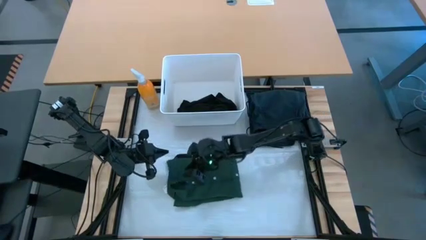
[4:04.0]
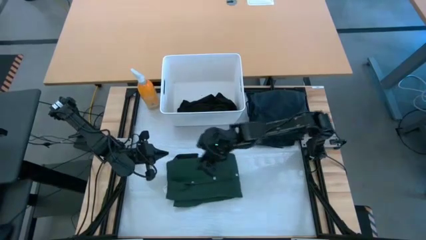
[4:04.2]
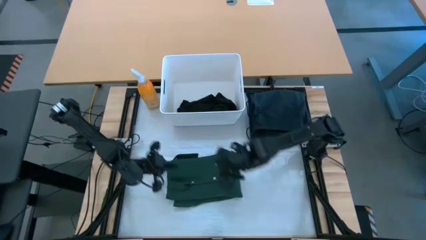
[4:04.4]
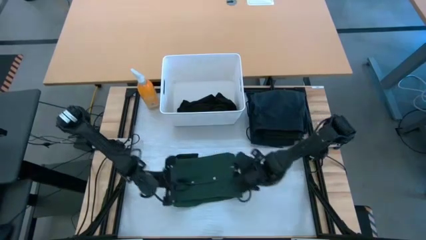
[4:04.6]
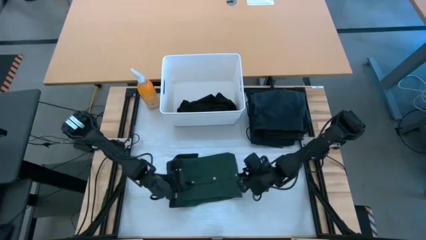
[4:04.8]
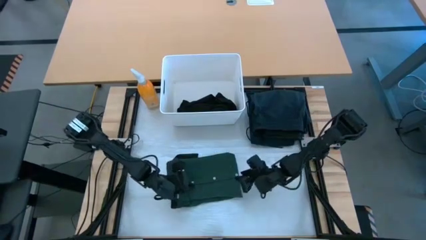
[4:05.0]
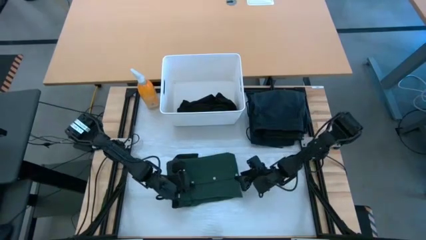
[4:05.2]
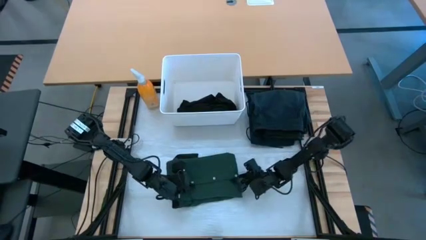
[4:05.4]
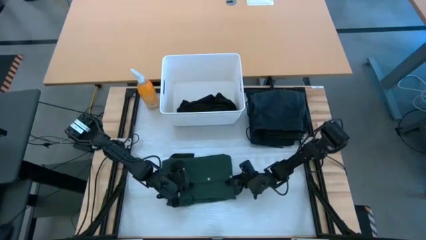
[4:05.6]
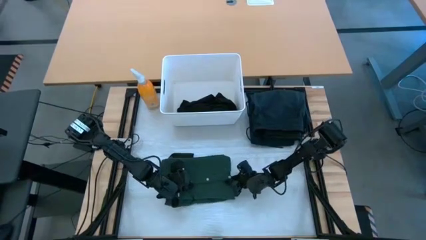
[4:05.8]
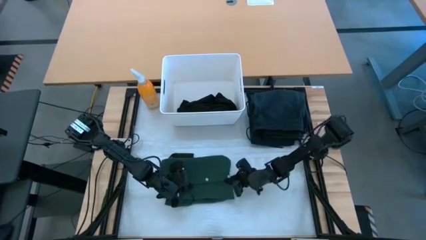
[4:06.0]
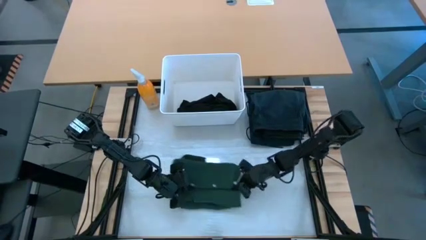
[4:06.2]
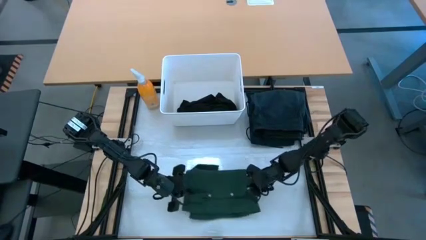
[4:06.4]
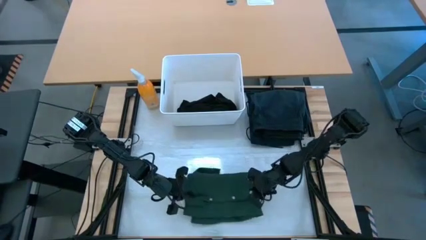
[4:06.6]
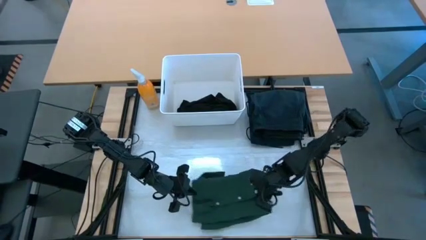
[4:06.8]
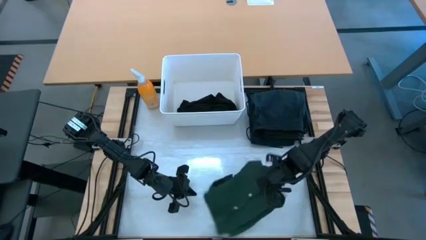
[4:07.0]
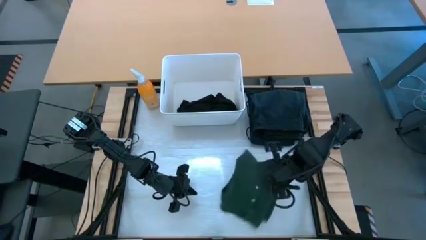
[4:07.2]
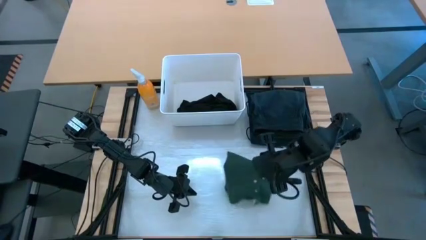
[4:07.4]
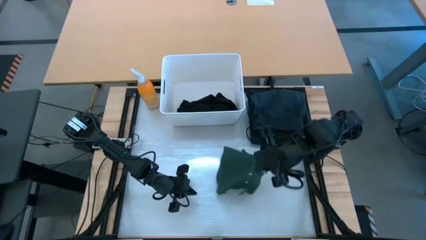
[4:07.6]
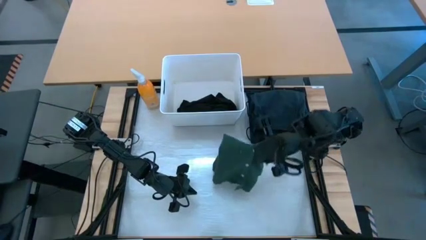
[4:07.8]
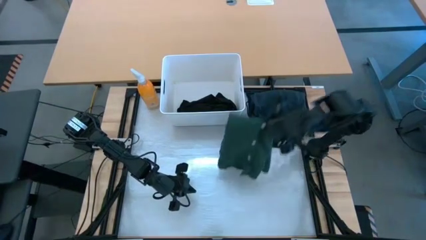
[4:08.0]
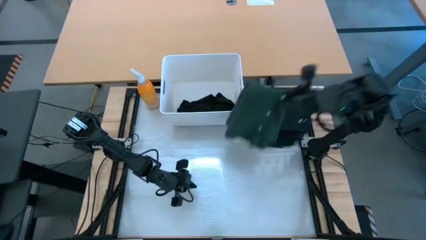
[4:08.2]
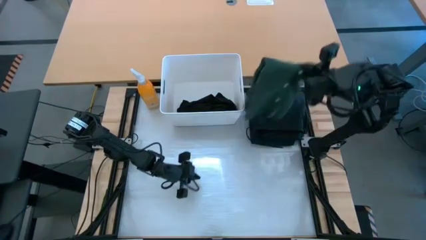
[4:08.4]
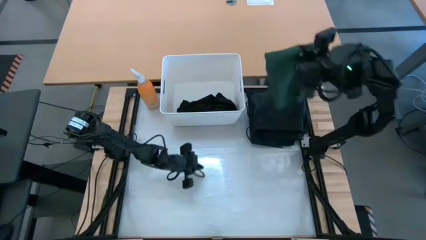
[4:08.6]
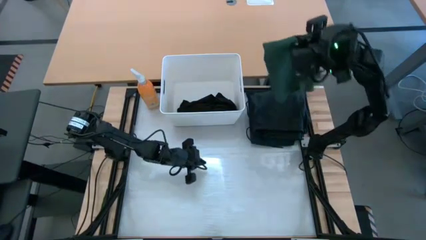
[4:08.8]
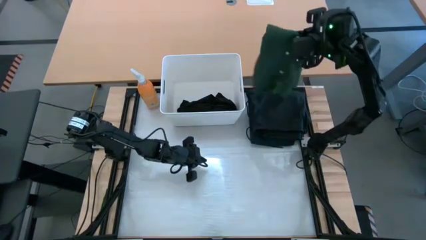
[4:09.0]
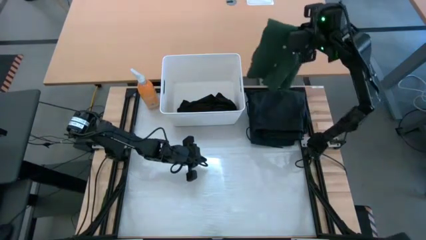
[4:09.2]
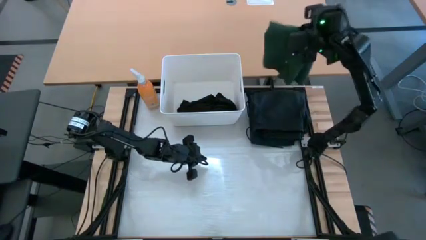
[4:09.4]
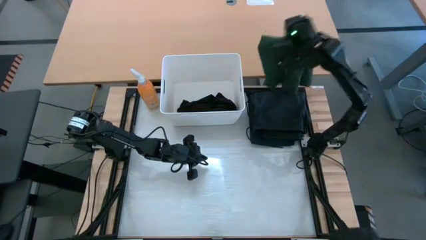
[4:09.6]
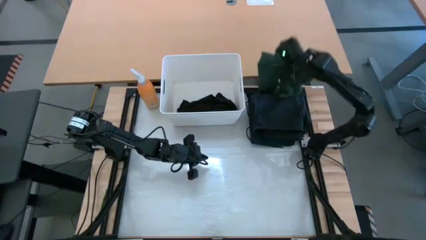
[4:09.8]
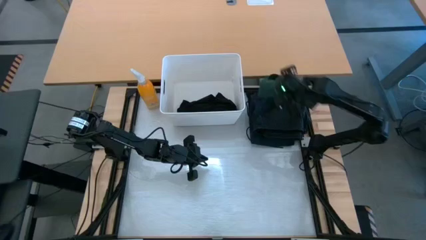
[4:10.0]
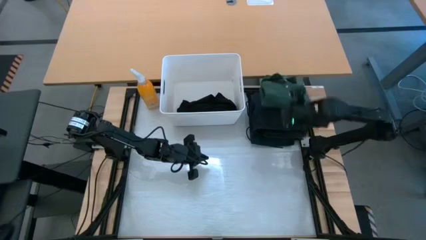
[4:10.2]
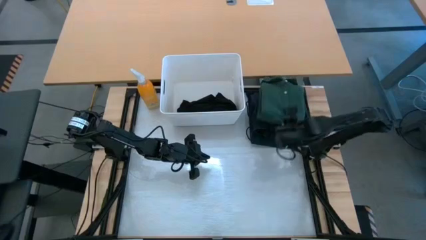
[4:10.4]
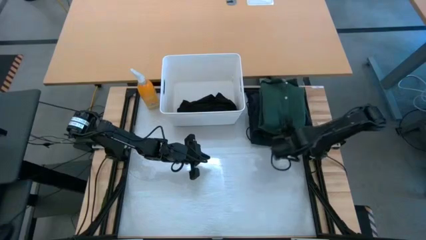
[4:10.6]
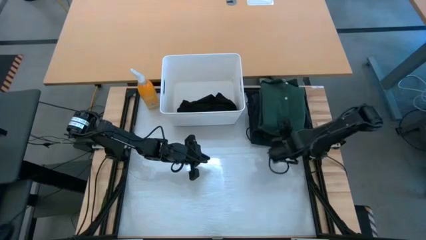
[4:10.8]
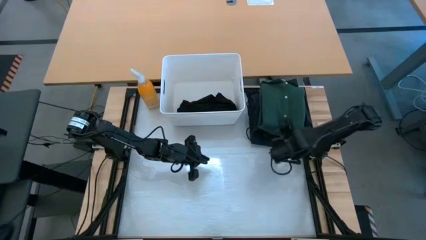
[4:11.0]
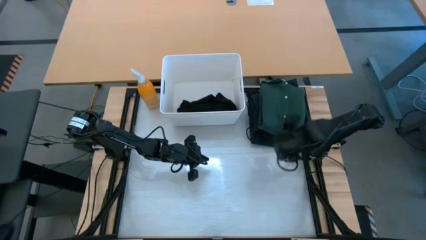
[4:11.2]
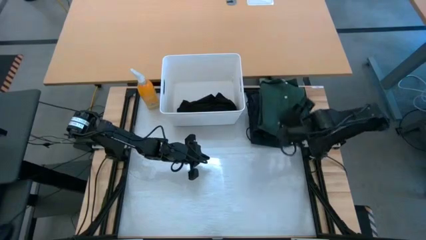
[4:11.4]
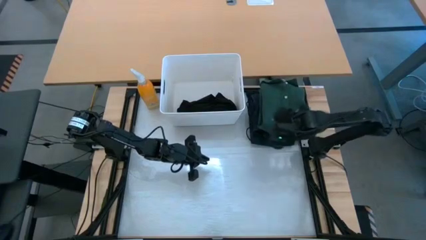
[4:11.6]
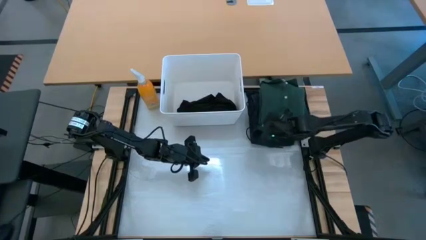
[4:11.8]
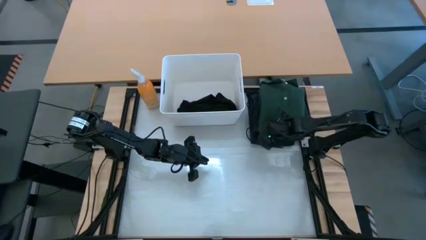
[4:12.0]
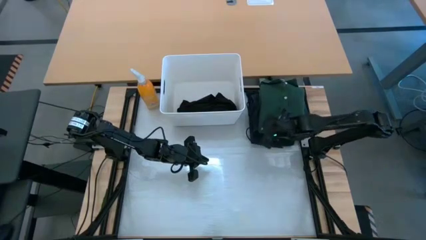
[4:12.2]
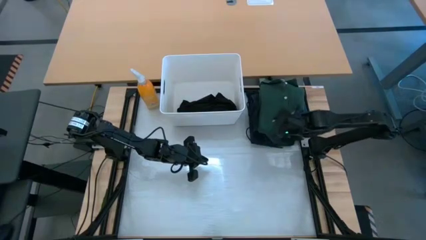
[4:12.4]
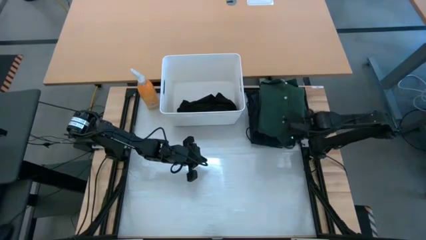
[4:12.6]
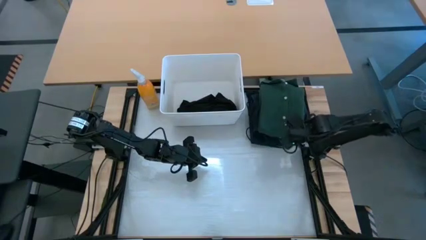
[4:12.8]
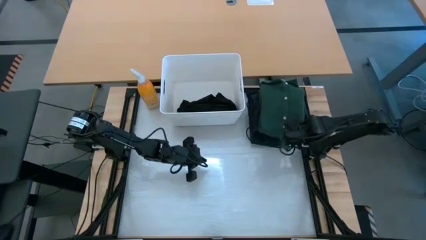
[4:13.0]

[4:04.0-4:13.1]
Task: Fold laundry
Stack the green polo on top of the black shorts

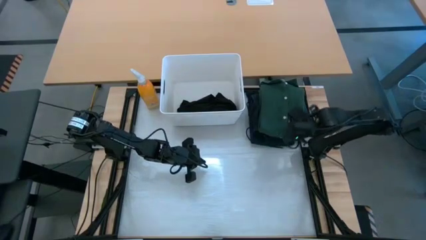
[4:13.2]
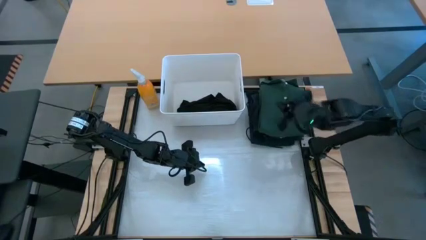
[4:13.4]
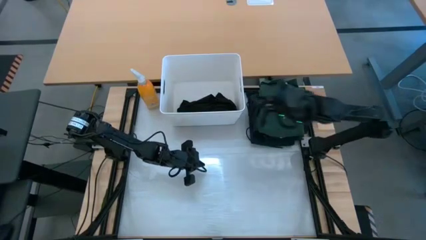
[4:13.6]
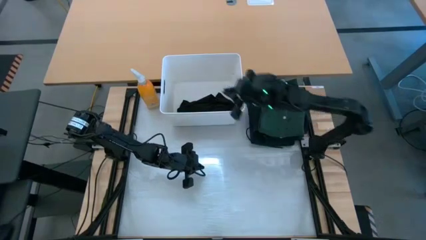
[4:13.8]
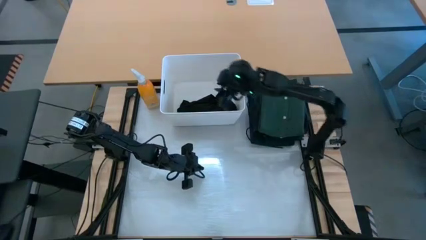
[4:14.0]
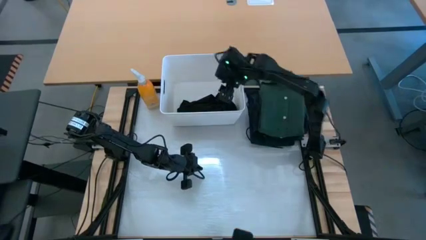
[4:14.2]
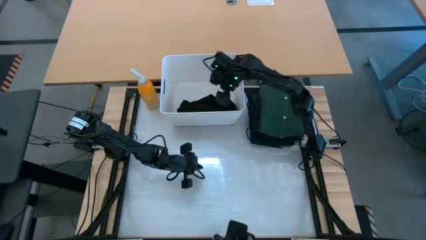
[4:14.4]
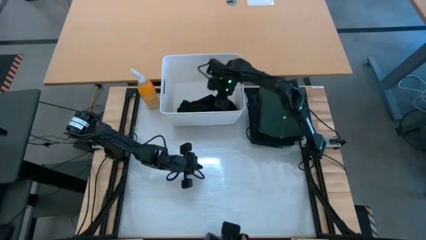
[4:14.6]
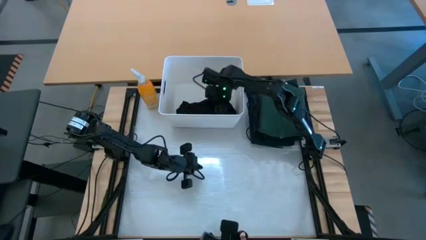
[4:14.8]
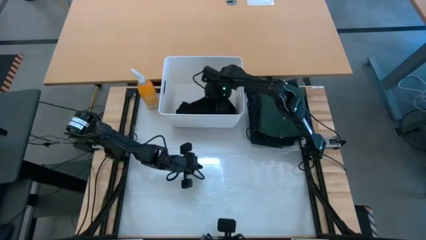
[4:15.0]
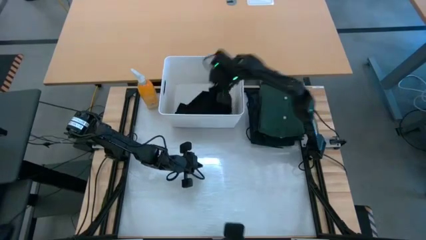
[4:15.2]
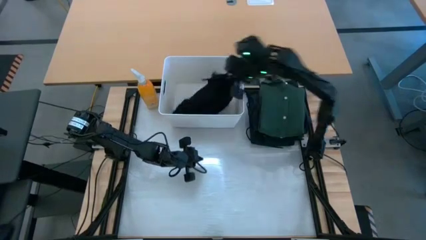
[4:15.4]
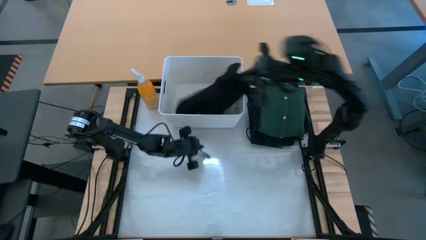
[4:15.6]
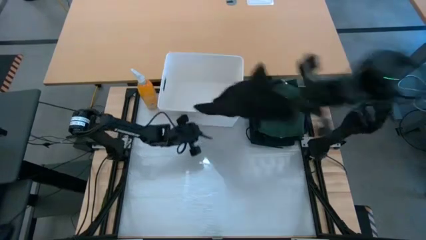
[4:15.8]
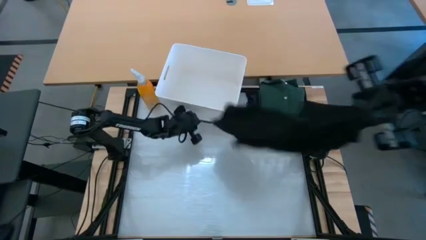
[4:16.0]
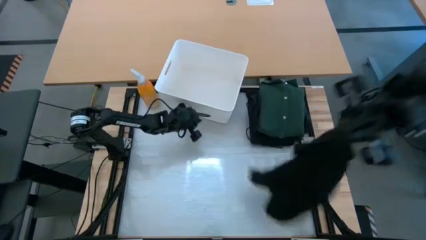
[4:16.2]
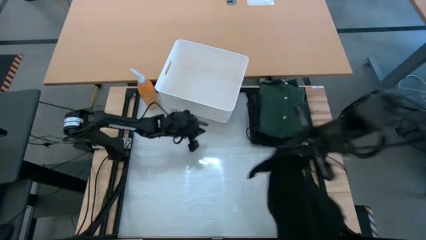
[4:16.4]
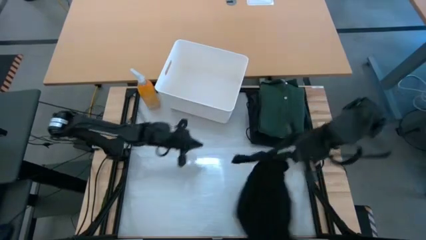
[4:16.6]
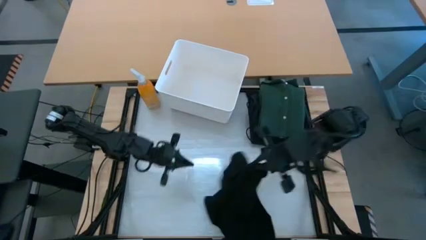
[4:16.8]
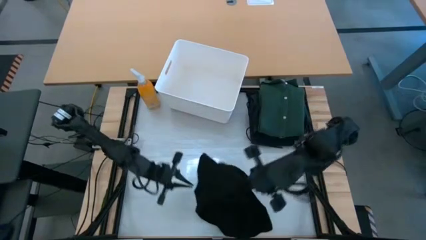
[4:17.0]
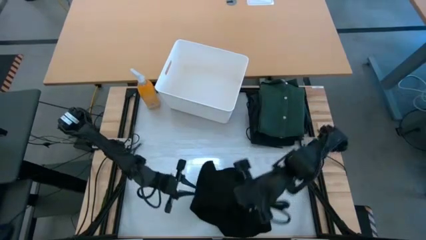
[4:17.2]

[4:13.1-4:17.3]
Remove the black shirt from the white bin

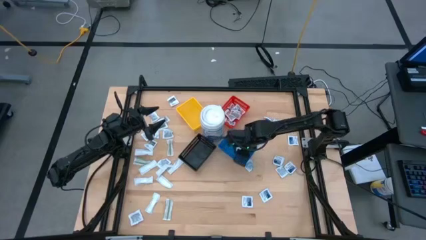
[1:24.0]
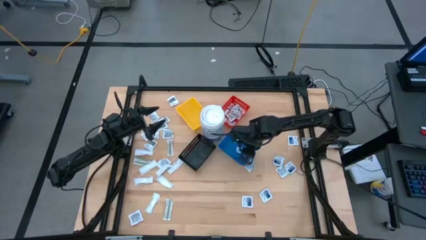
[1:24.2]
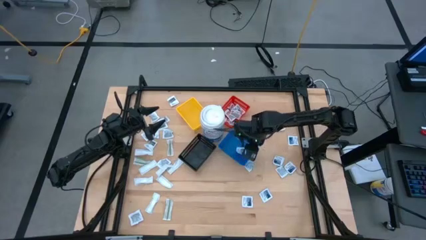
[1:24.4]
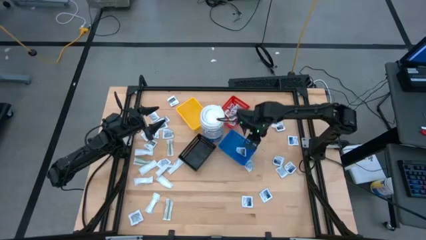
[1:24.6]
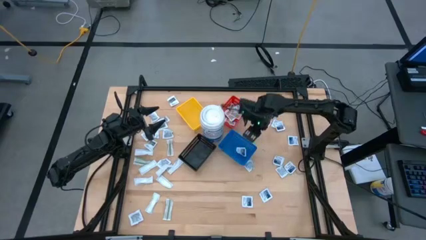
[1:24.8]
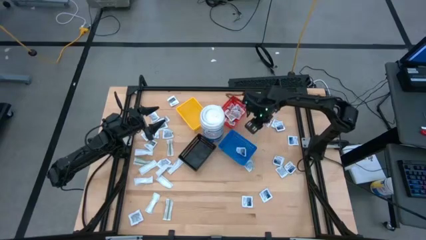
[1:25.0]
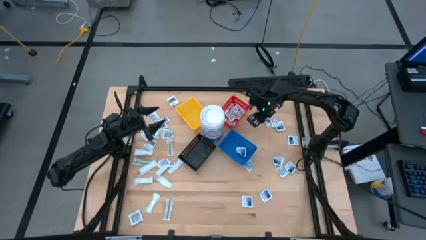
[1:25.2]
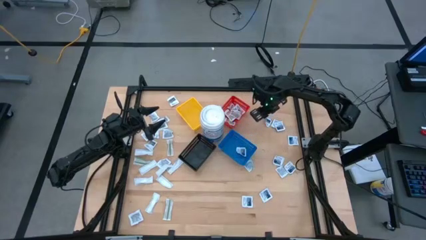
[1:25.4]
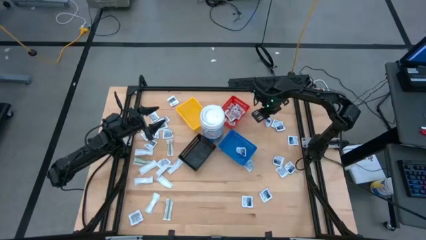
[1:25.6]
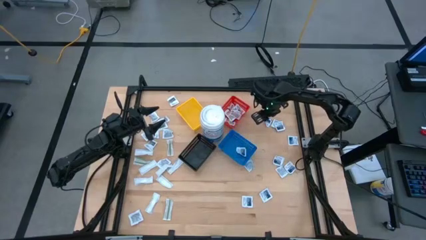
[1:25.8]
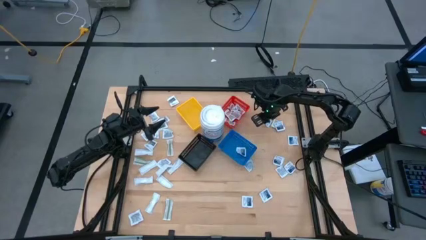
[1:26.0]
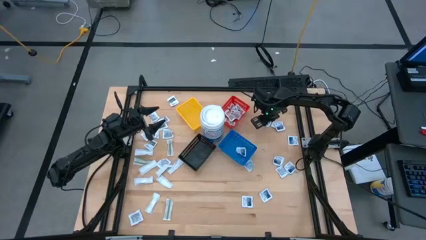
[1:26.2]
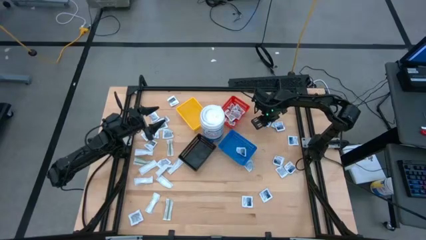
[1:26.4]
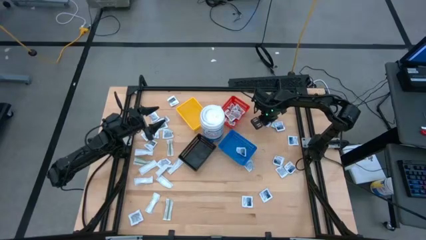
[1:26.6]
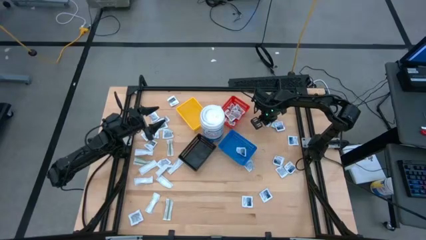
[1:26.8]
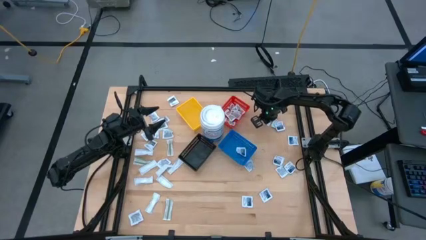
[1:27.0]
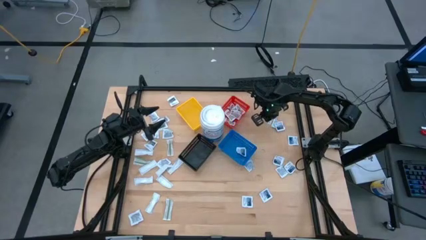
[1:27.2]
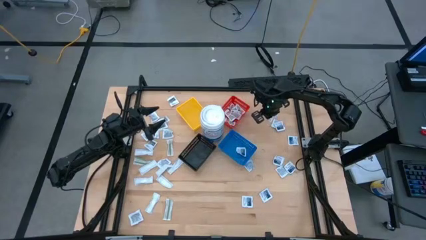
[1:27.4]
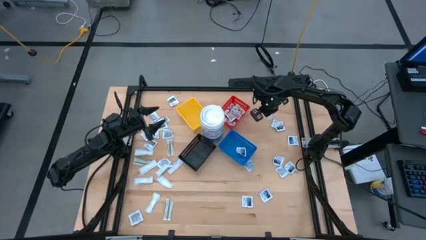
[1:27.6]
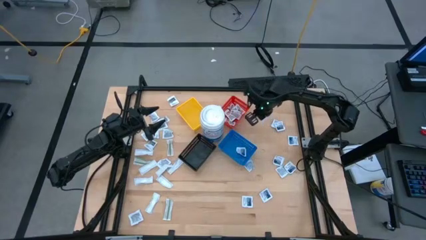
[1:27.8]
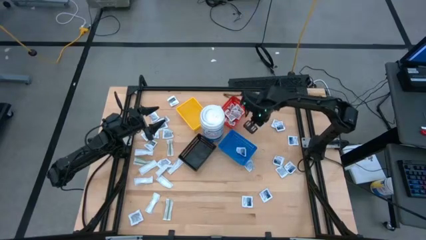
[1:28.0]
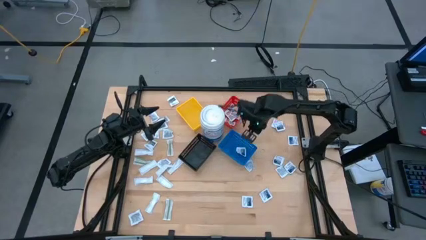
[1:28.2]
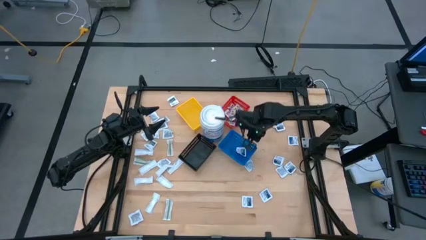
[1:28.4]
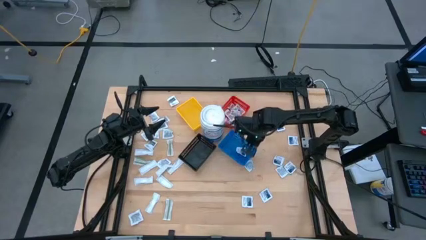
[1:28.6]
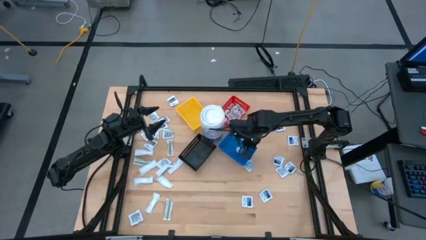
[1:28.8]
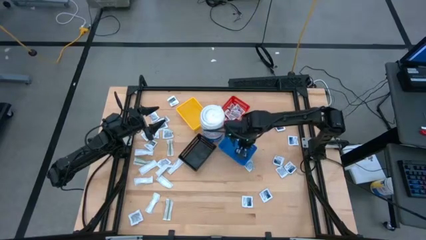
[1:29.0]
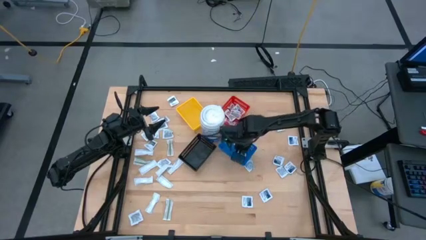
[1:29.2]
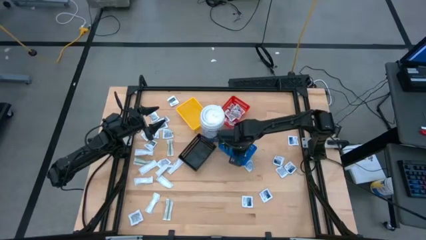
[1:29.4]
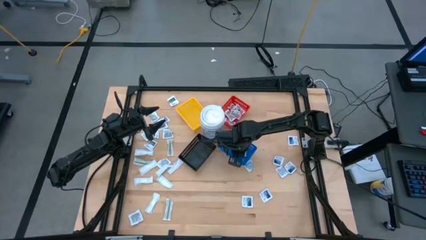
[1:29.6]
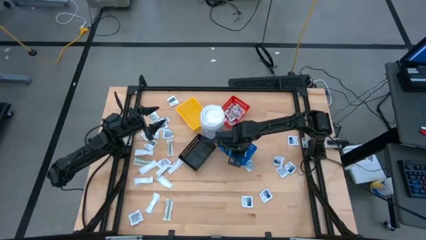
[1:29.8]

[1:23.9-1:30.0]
Task: Pick & Place First Aid Supplies
Put the alcohol pad into the blue bin
